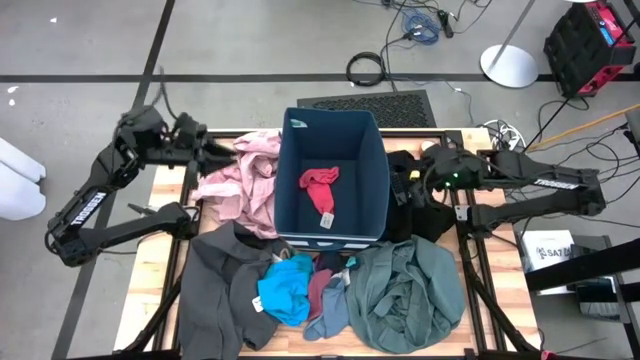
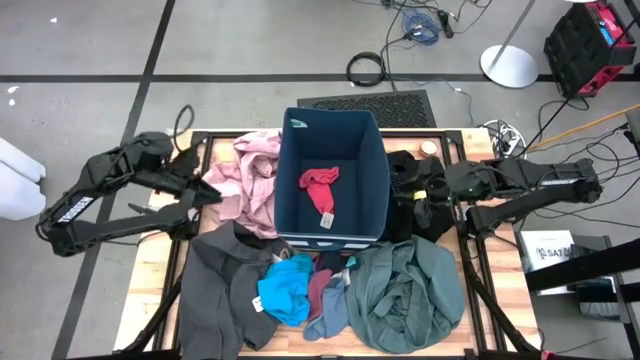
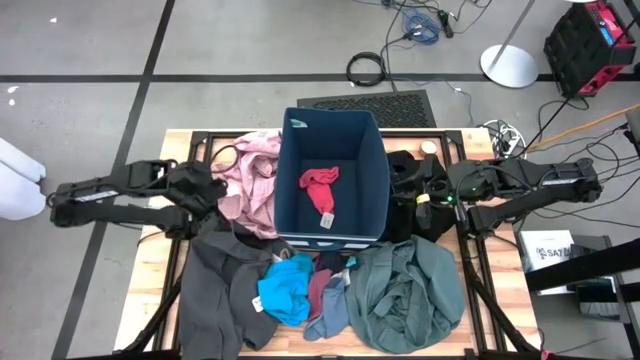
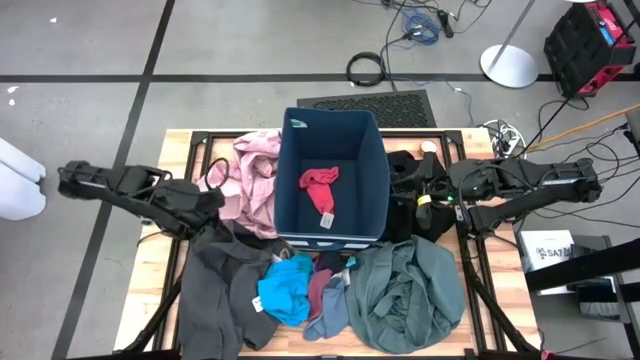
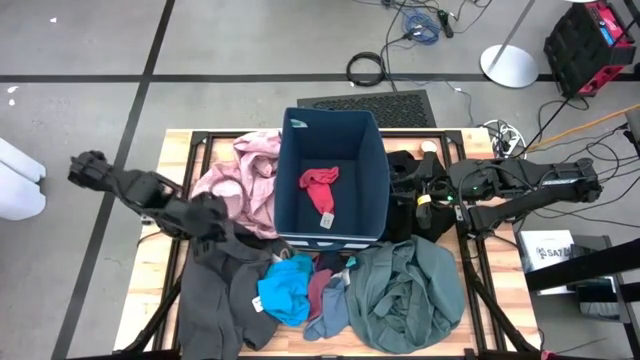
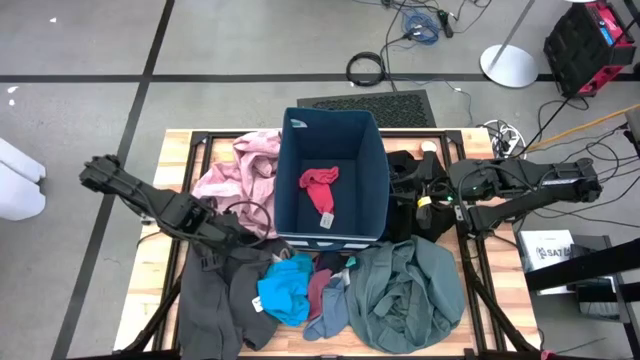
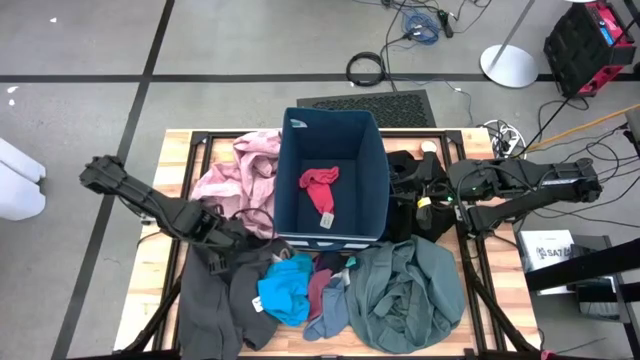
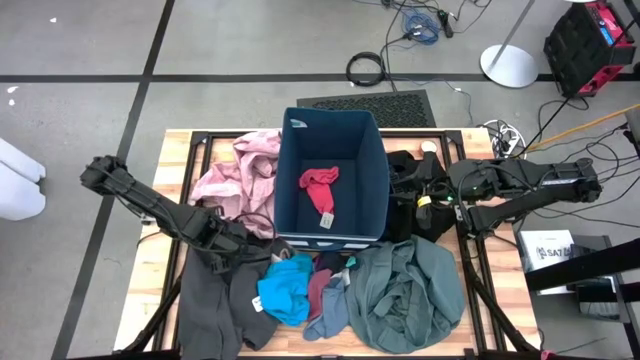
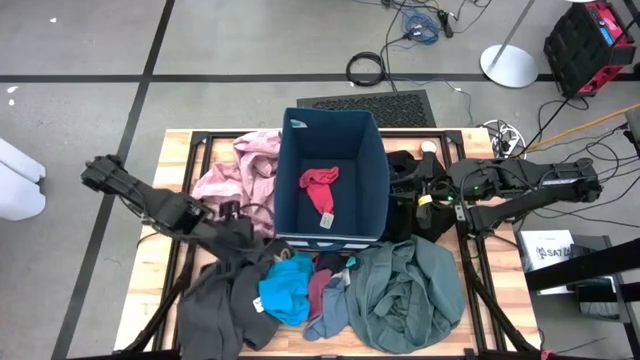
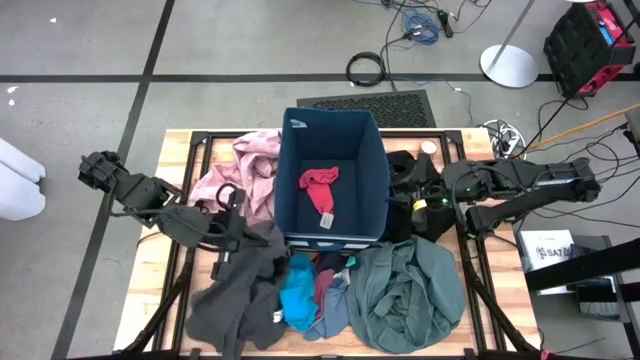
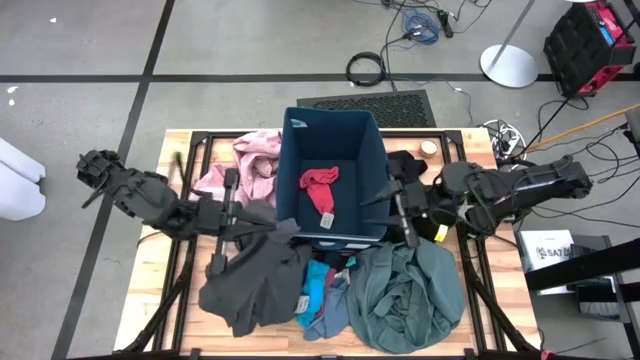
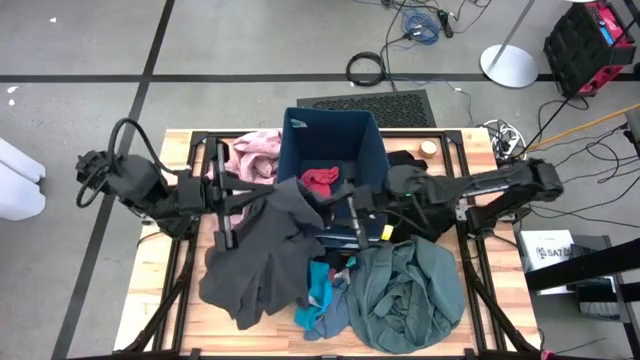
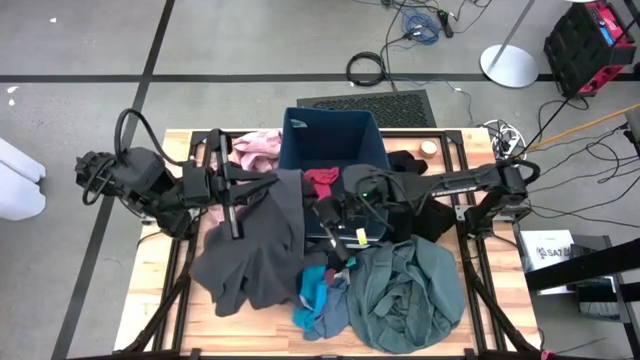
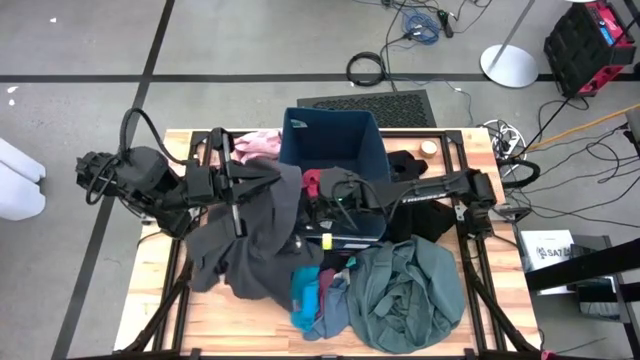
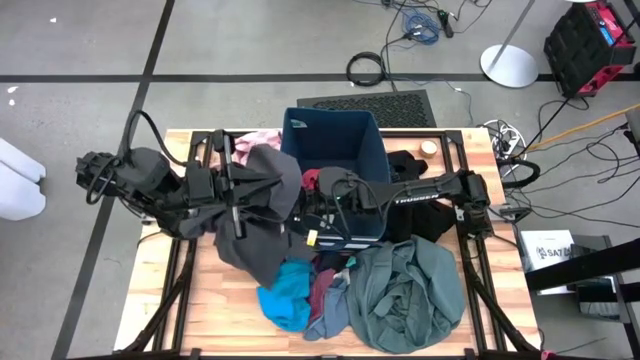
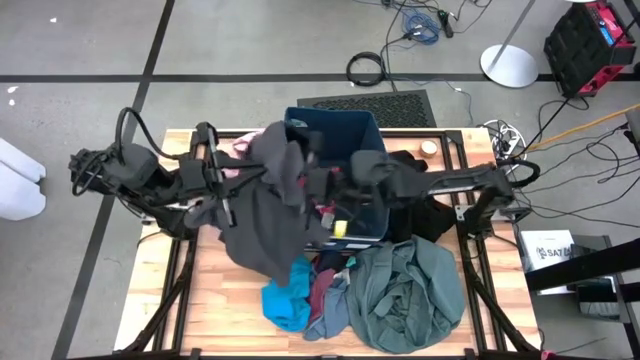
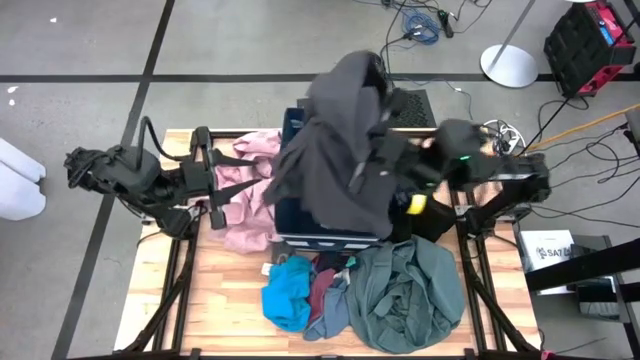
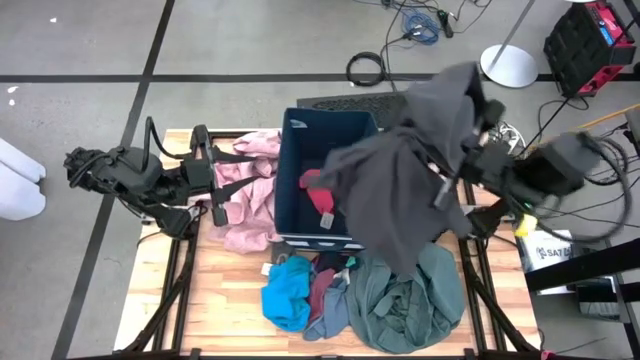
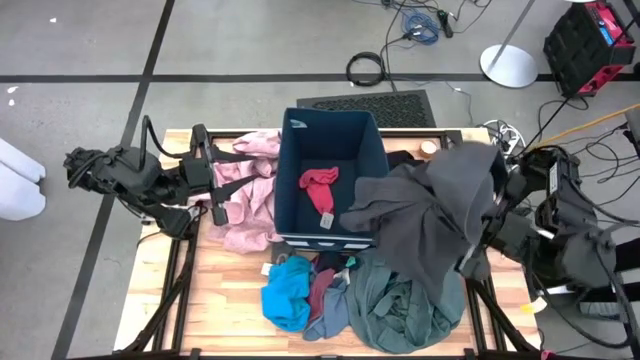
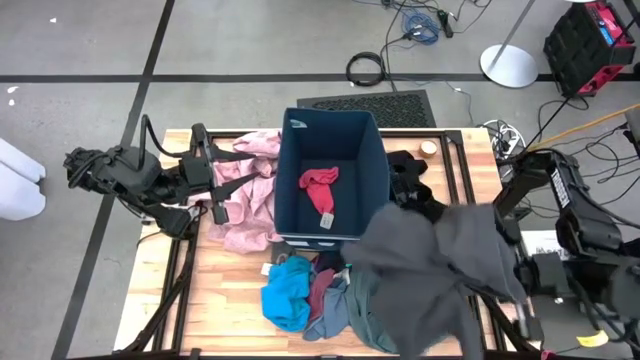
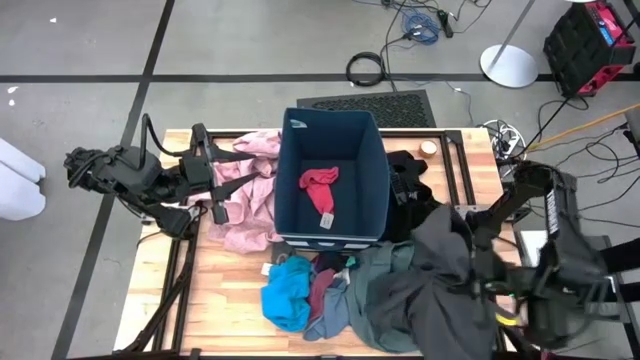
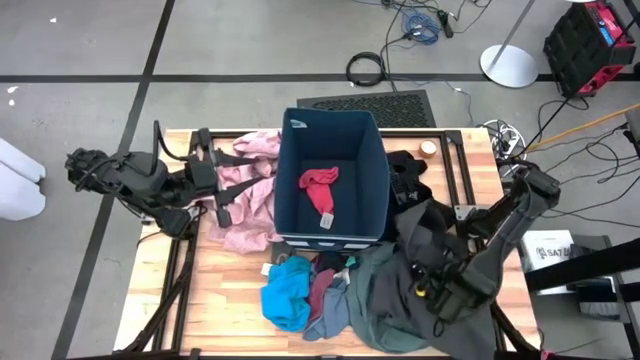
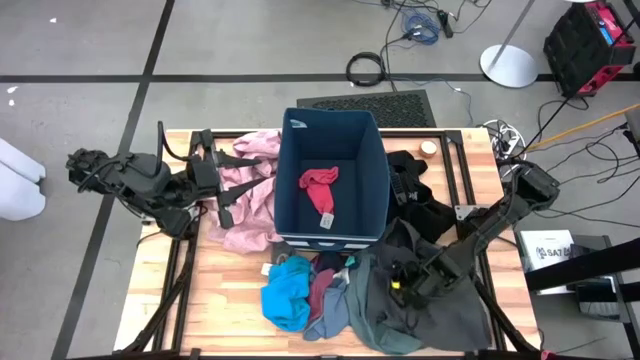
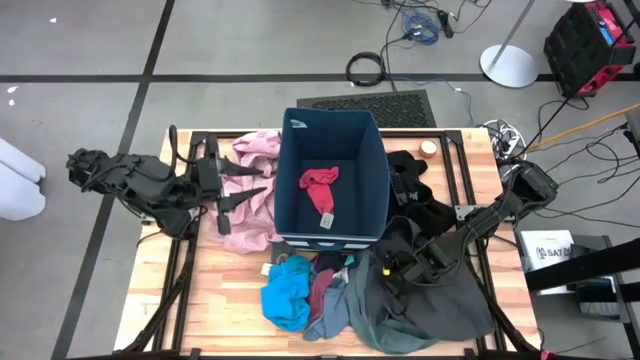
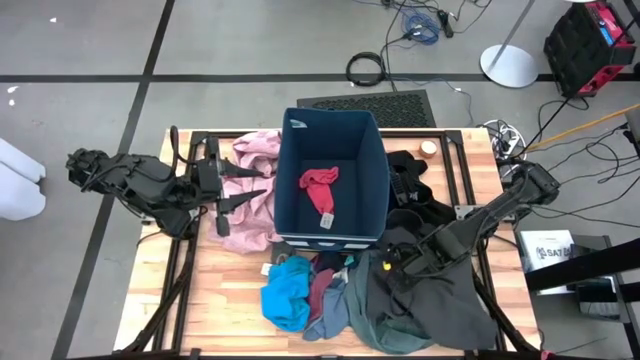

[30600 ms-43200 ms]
Task: Sort clothes
Move the gray cargo shorts to the right of the table

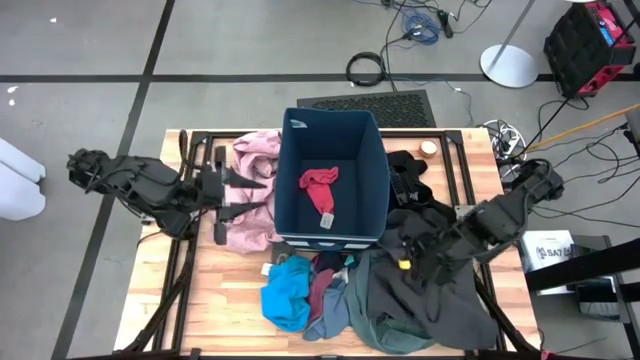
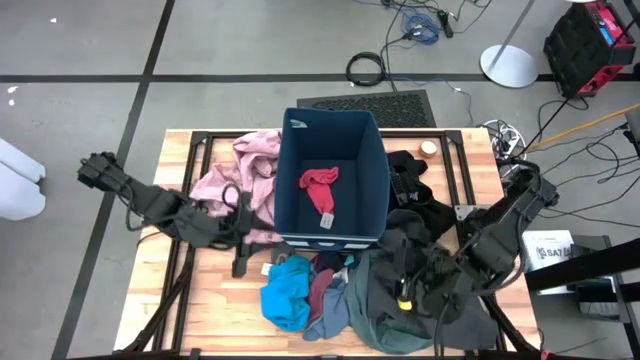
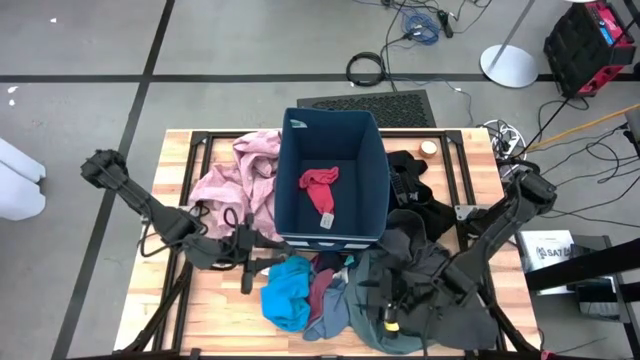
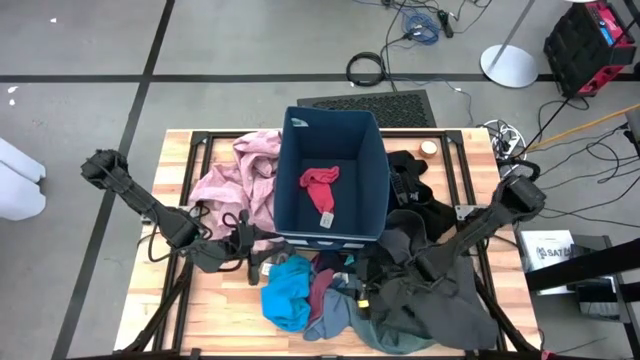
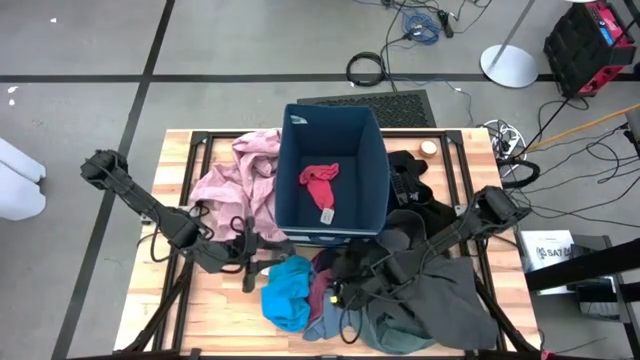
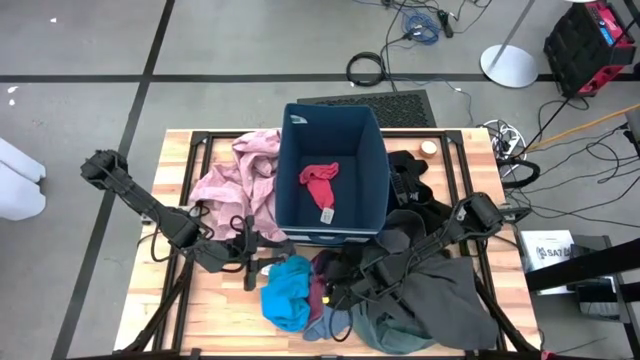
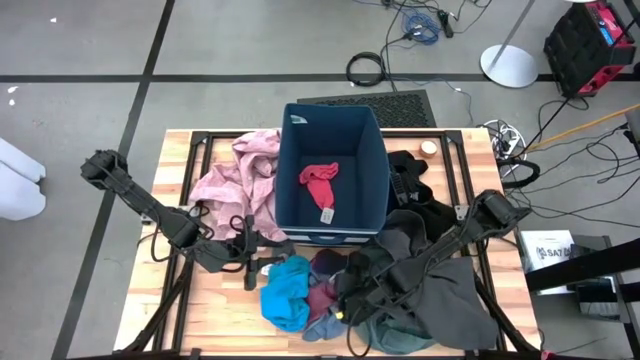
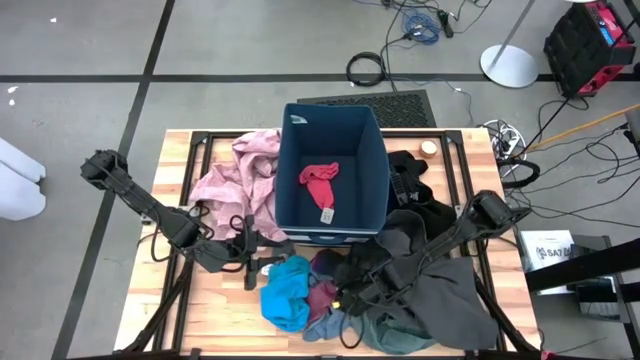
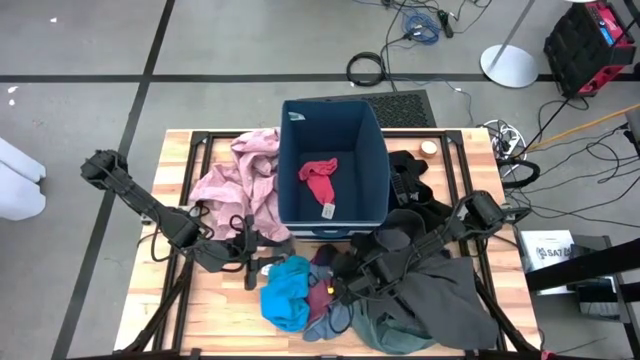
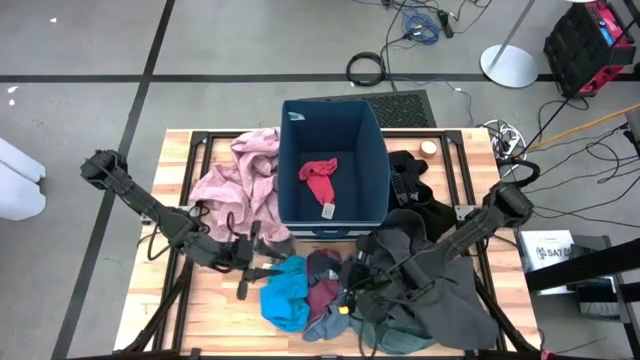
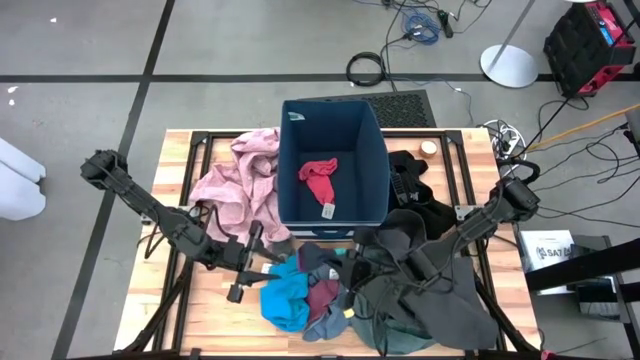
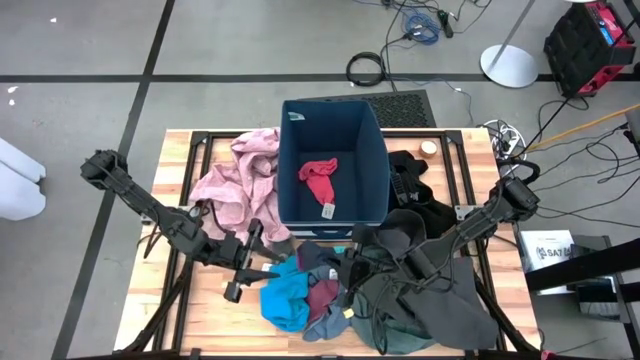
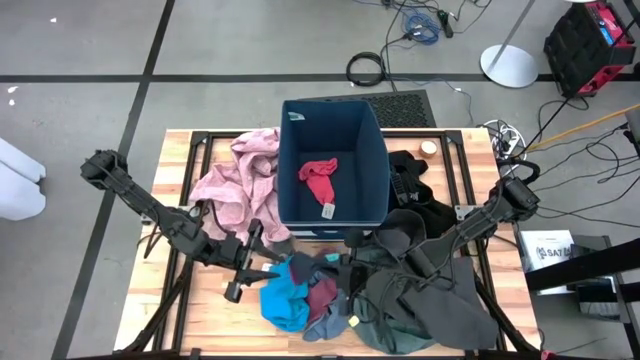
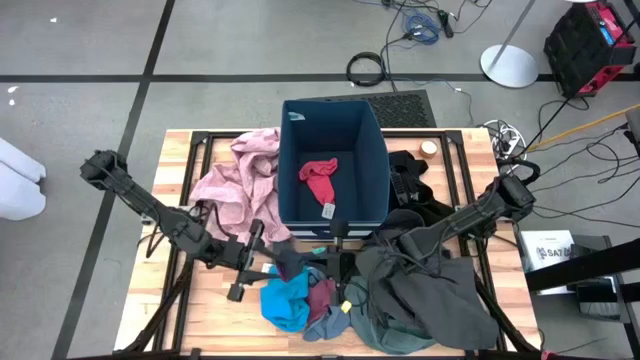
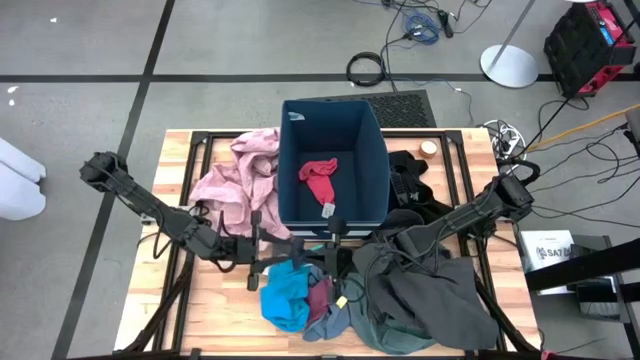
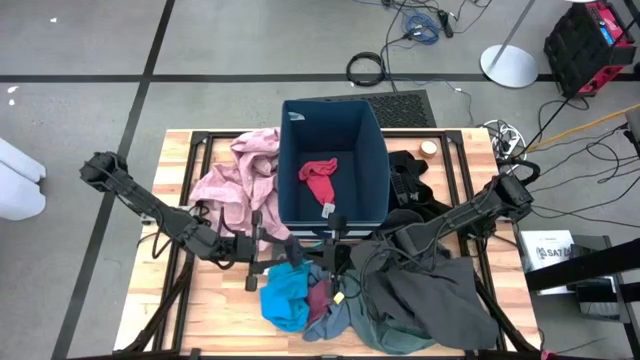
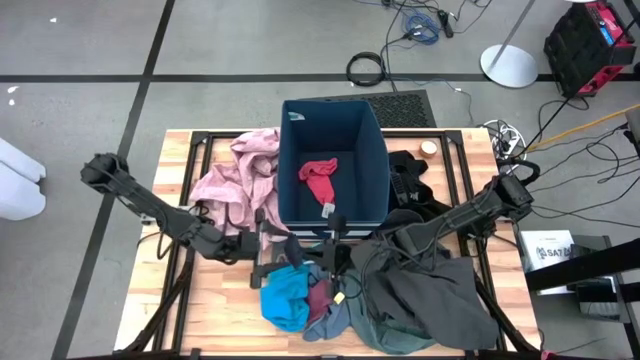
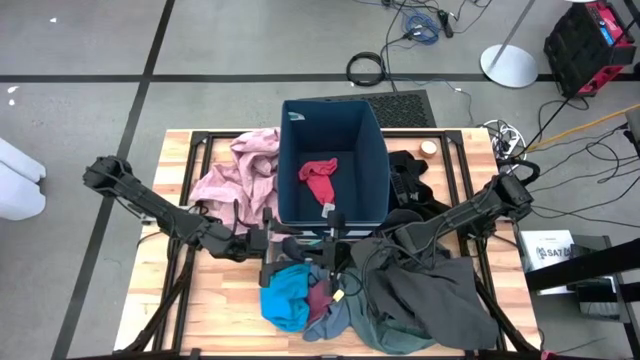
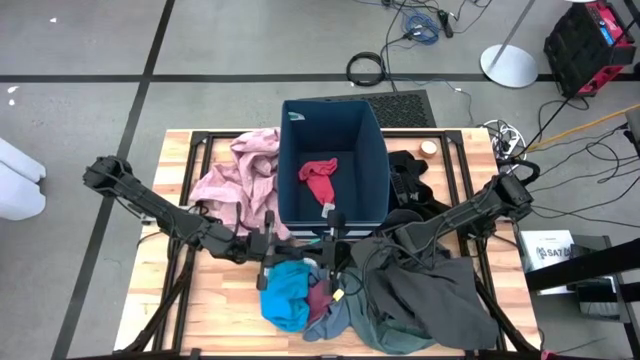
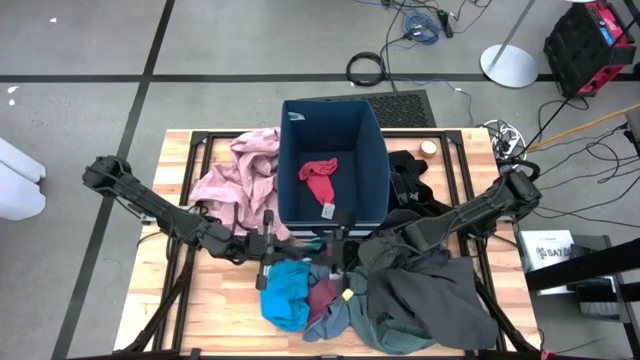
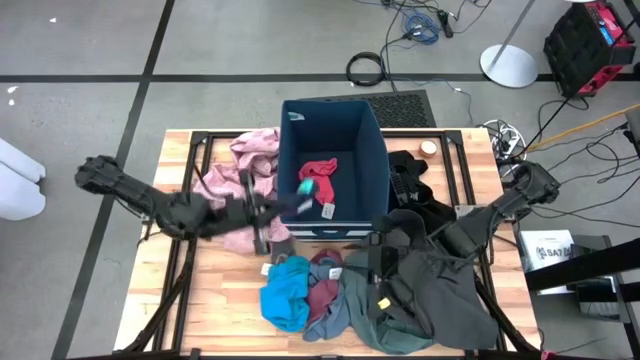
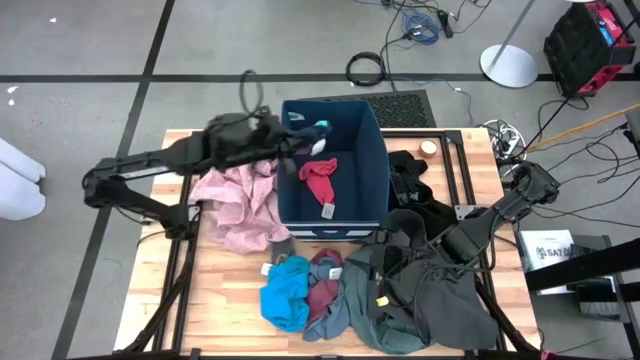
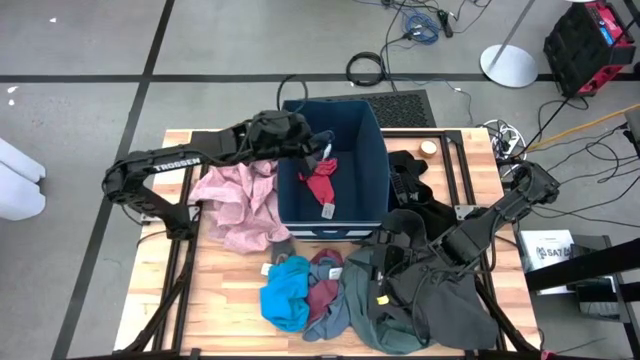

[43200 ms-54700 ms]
Put the dark blue sock into the blue laundry organizer
